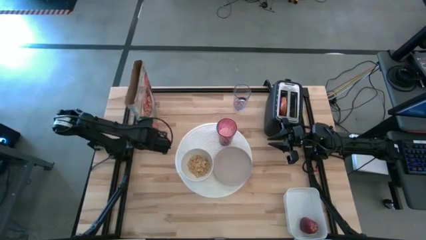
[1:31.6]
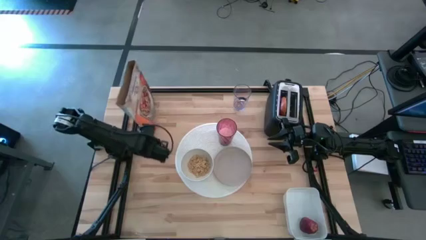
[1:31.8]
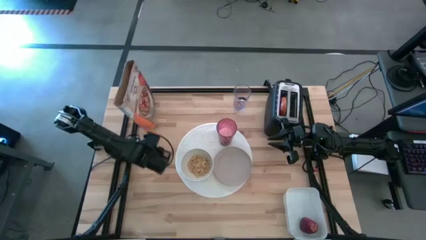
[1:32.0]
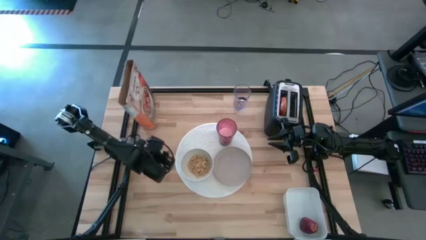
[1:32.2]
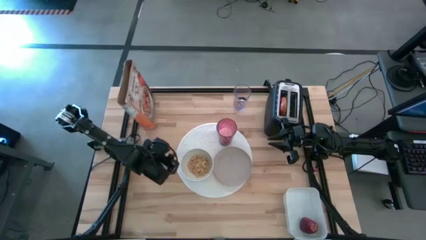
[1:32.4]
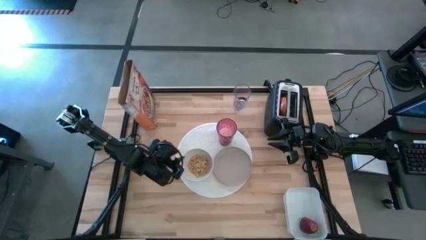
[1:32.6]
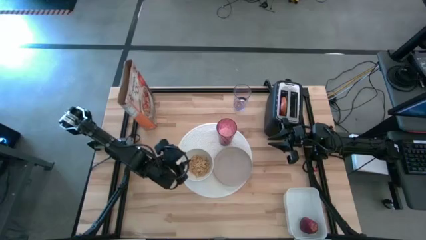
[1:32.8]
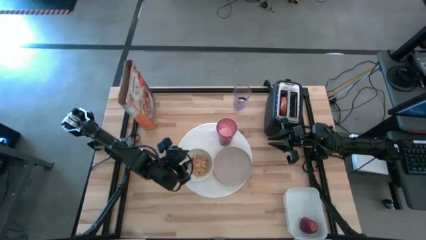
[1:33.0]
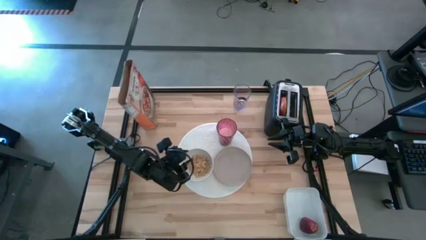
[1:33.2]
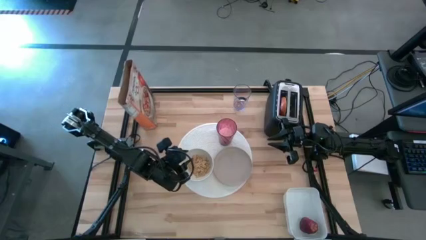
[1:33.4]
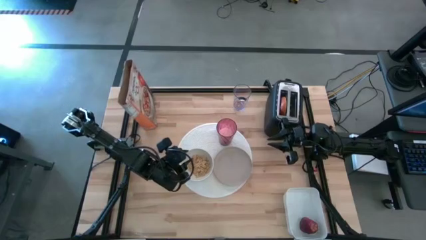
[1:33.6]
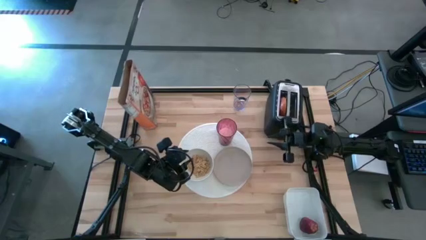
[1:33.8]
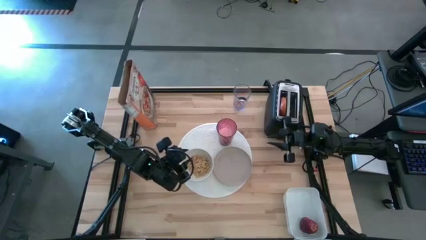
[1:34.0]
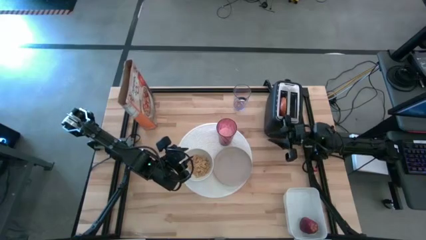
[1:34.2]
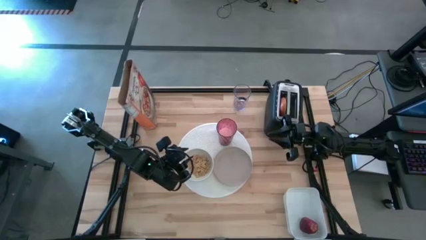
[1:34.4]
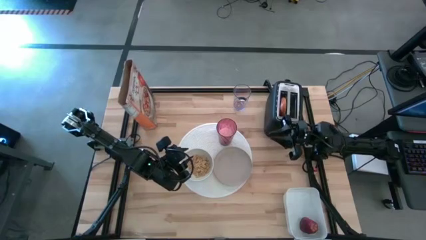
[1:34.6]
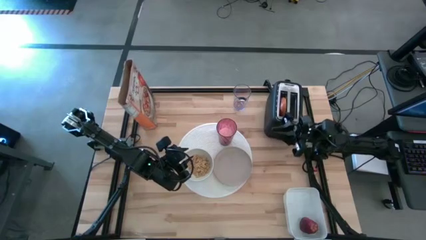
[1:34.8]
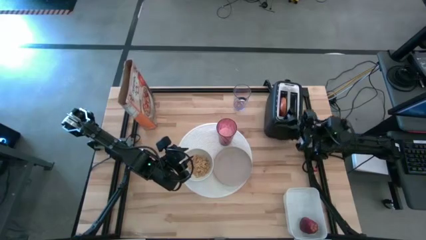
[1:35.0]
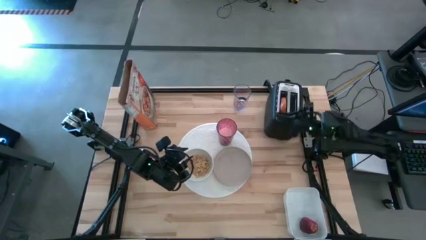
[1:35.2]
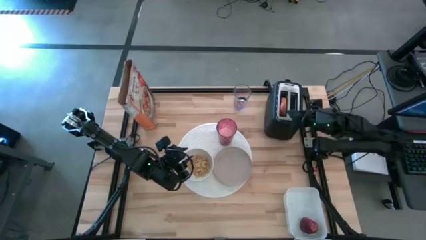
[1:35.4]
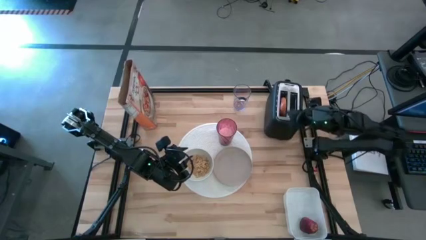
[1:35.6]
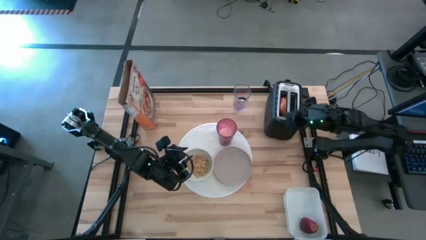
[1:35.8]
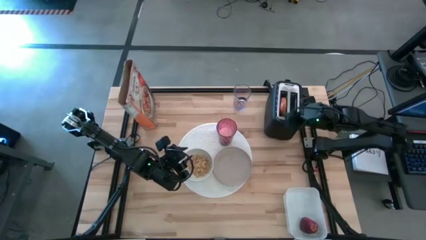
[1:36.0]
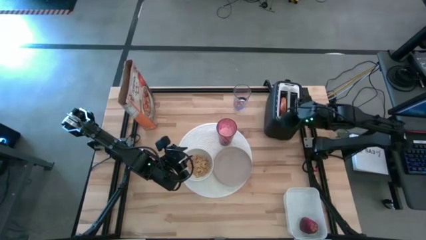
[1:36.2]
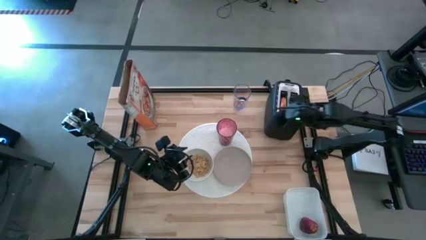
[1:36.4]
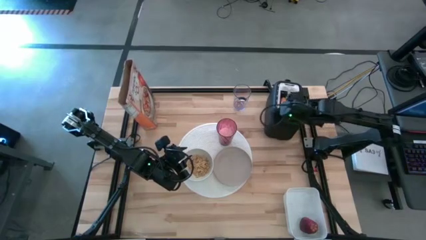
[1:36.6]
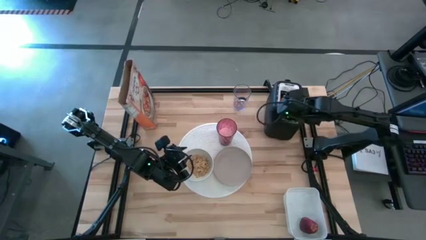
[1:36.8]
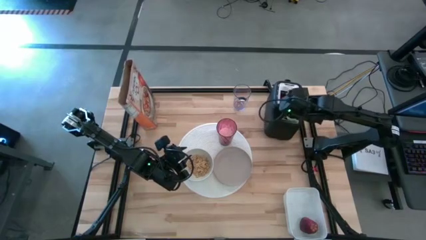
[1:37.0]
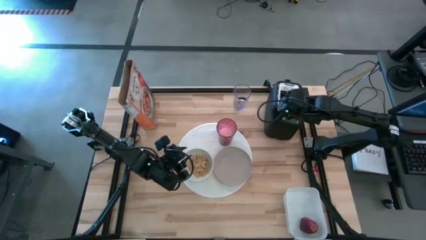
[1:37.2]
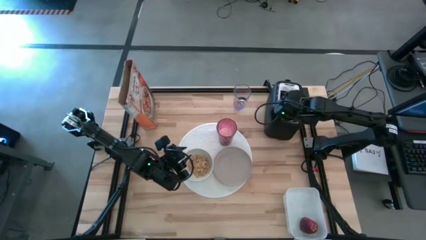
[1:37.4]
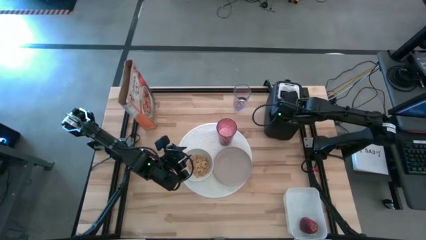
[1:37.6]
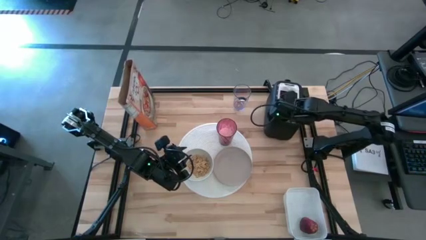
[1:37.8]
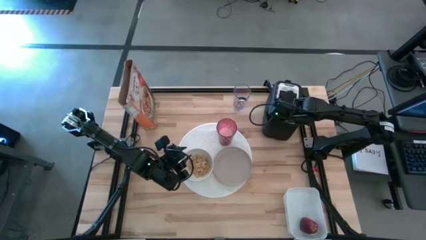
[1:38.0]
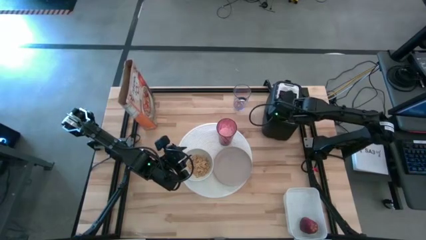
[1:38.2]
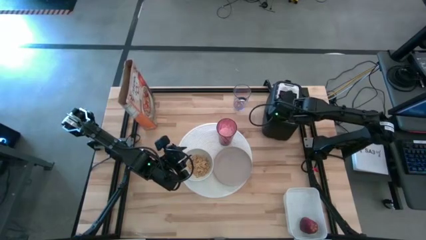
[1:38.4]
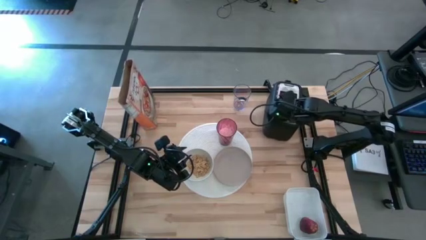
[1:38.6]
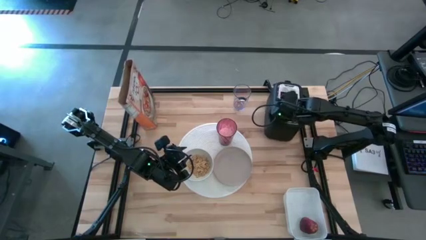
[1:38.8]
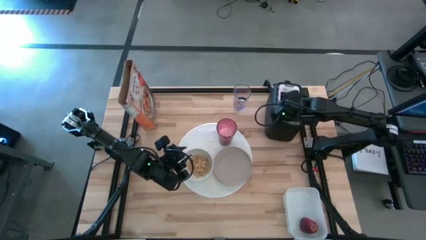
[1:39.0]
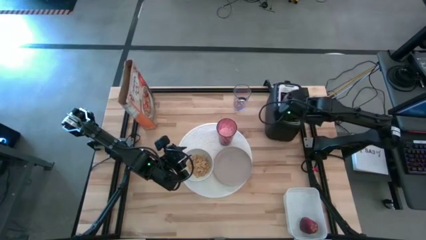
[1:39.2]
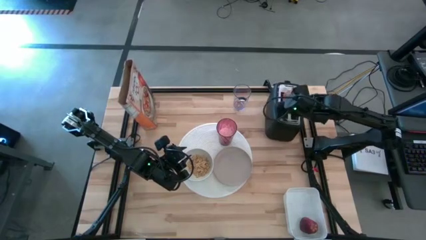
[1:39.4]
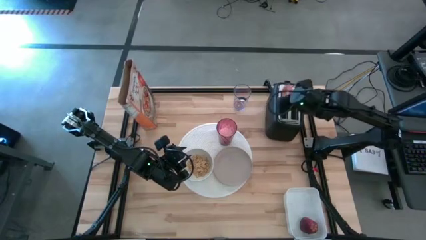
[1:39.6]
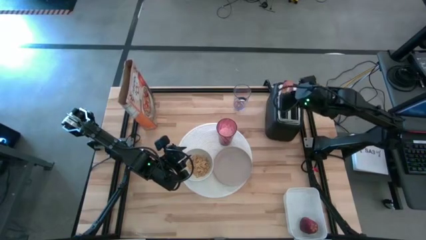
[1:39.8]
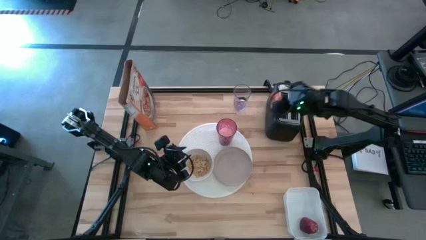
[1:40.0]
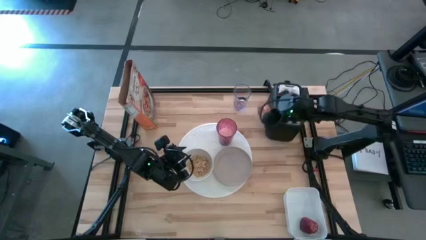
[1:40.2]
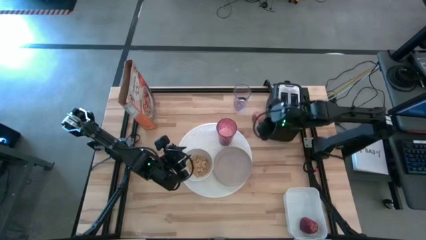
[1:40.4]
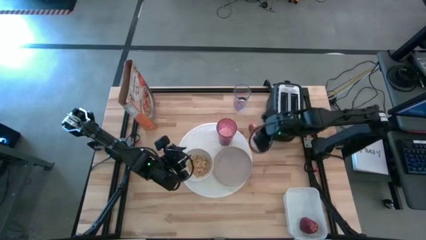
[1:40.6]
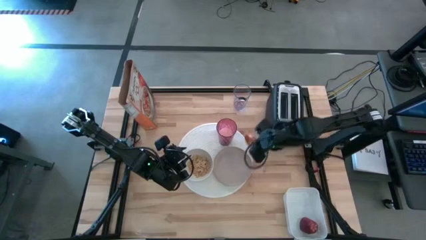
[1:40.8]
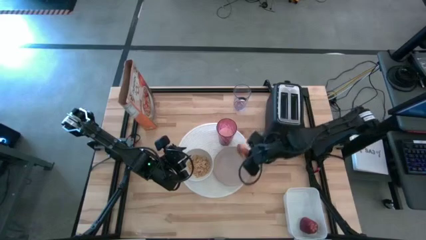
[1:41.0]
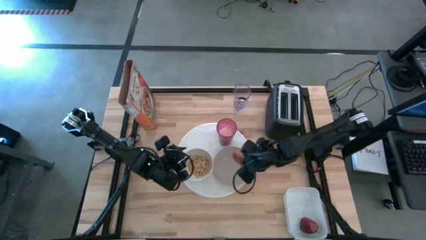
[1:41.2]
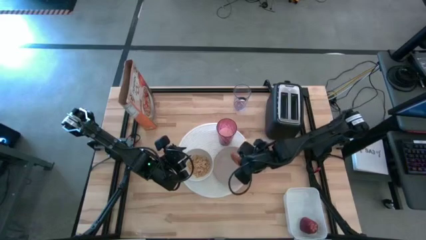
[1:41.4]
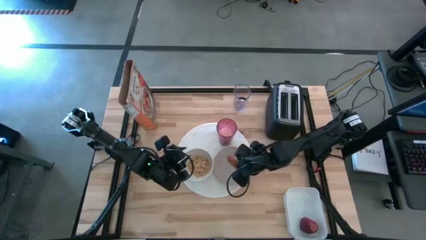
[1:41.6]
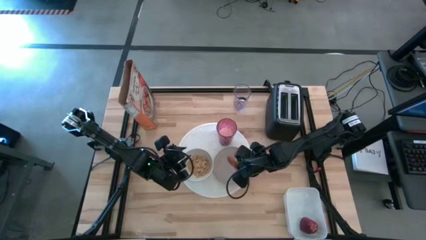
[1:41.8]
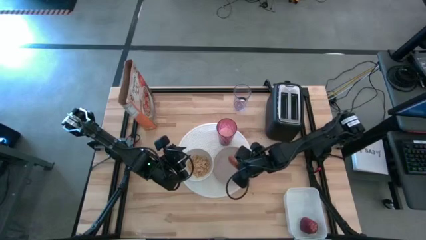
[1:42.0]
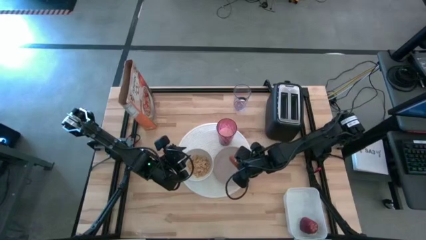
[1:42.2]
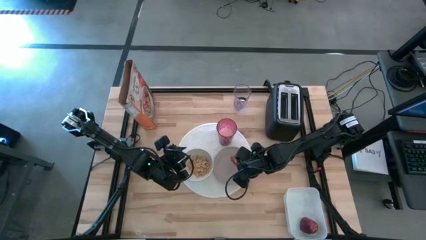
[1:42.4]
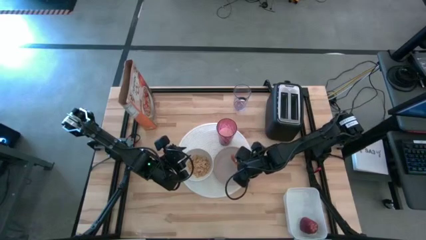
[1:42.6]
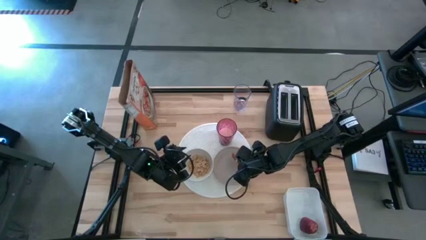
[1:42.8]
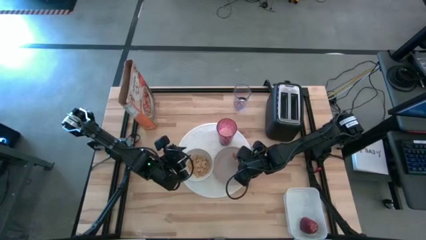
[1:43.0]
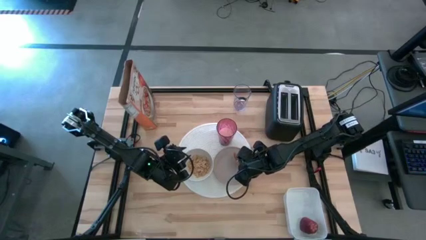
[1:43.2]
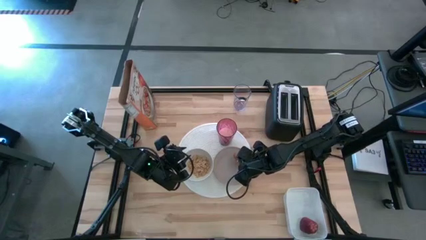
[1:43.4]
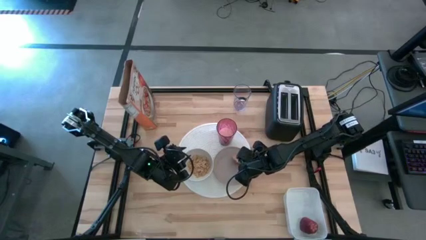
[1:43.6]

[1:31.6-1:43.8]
Task: Arrange a breakfast setting
Put the toasted bread on the light brown plate

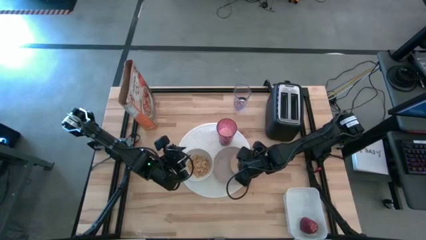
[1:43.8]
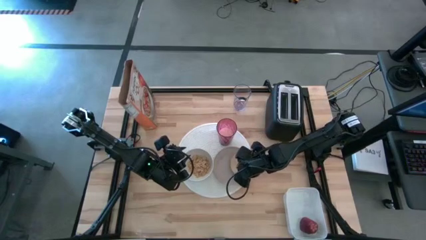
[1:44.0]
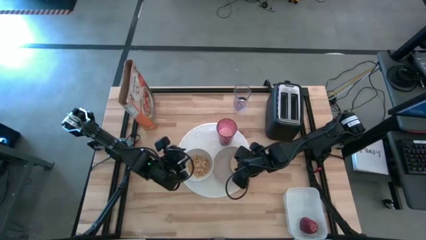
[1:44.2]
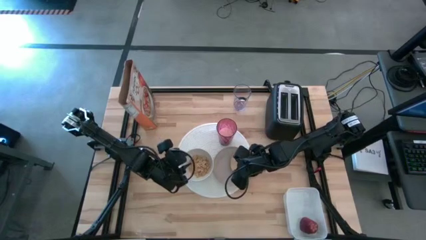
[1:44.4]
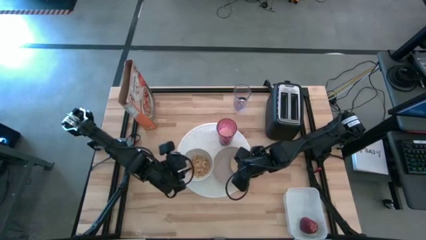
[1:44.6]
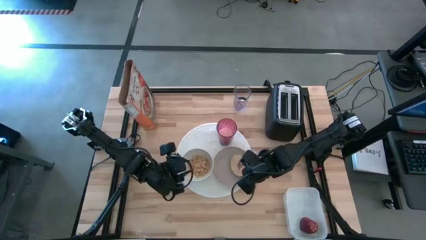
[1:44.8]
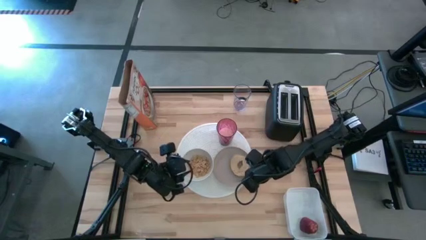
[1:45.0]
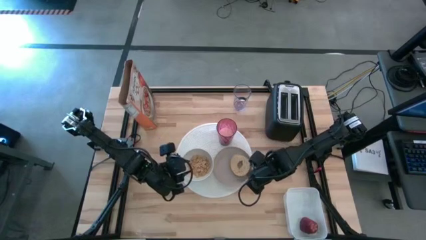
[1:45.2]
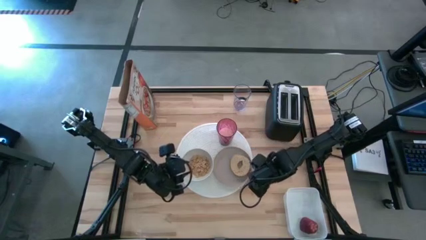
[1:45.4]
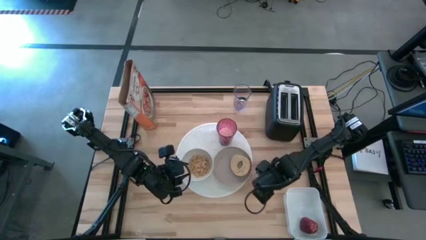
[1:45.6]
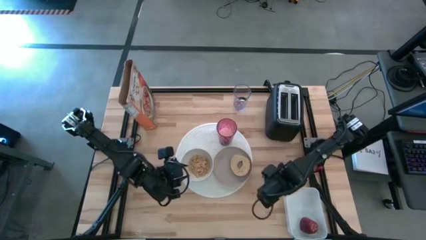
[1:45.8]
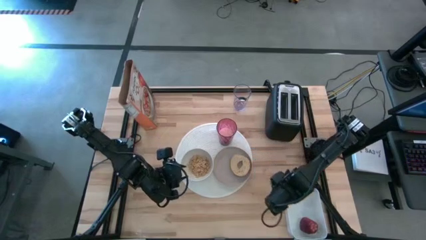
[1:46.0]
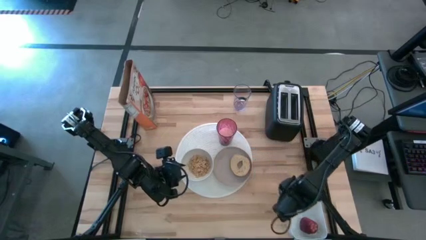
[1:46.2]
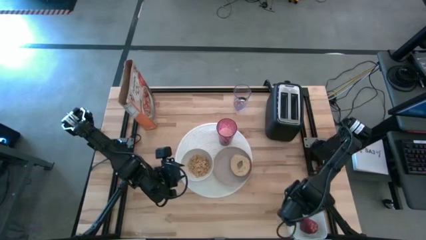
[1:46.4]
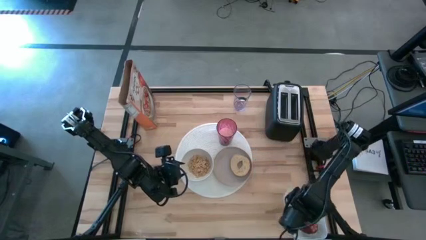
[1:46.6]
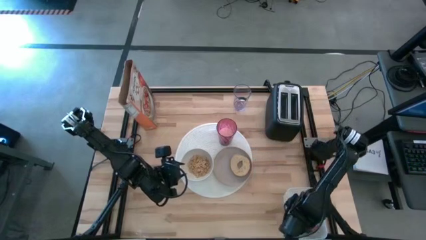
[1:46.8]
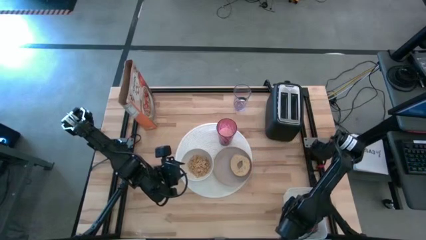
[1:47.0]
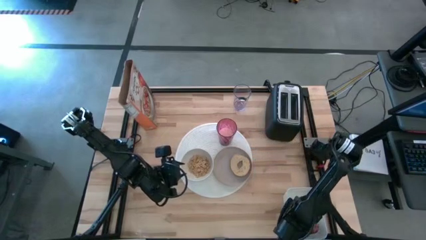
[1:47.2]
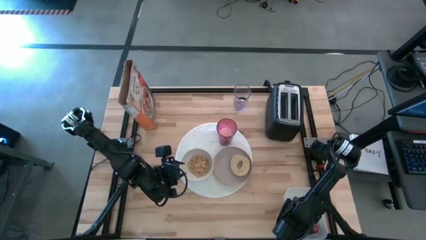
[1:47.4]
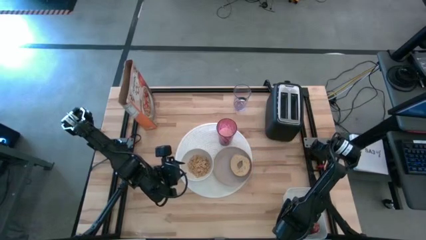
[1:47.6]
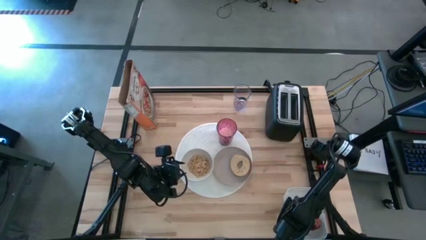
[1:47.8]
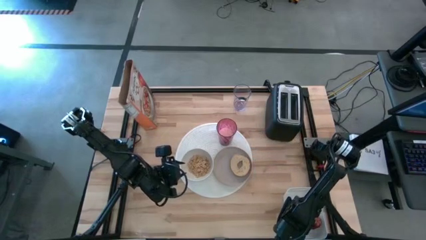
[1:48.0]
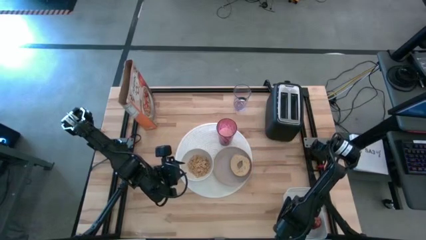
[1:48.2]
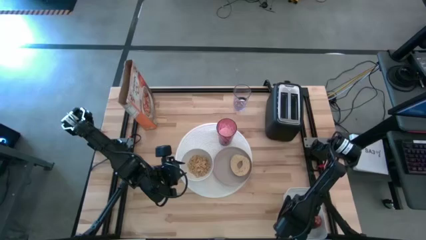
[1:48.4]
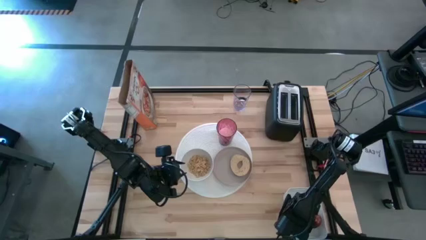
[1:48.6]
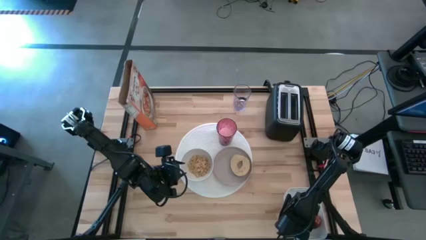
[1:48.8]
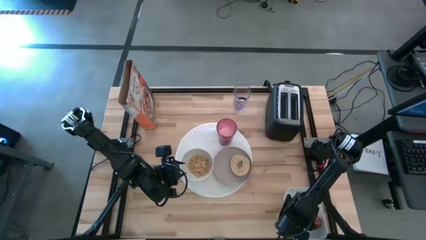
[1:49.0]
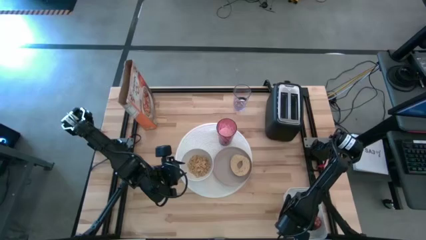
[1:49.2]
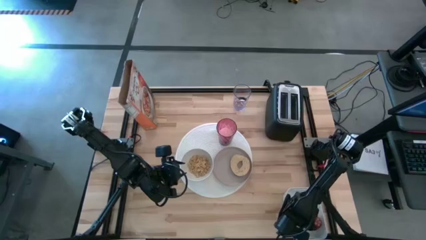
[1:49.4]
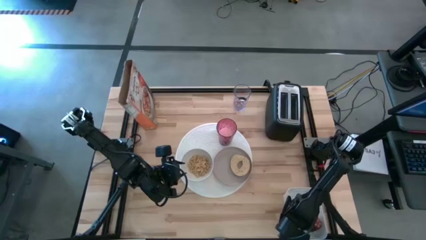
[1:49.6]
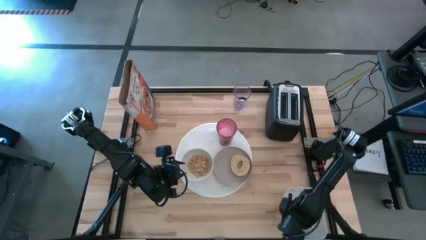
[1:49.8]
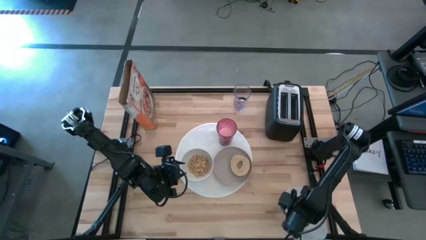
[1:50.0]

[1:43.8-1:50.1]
Put the red apple on the white table mat to the left of the red glass
